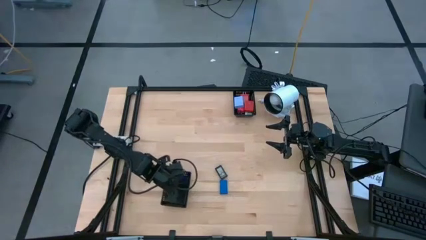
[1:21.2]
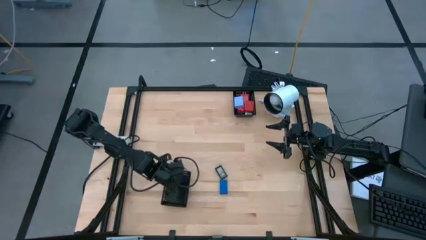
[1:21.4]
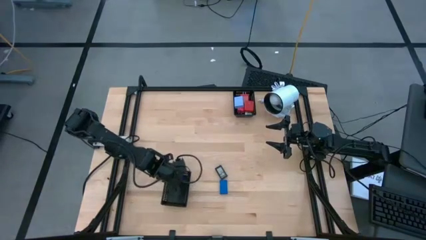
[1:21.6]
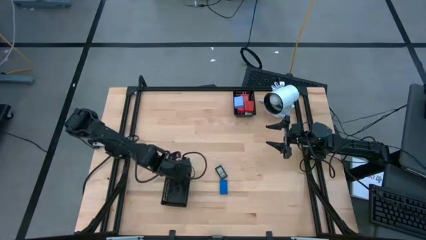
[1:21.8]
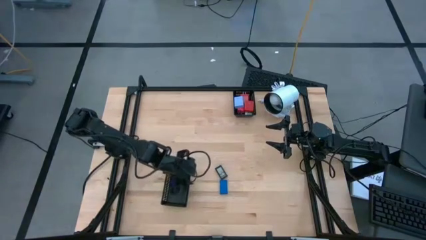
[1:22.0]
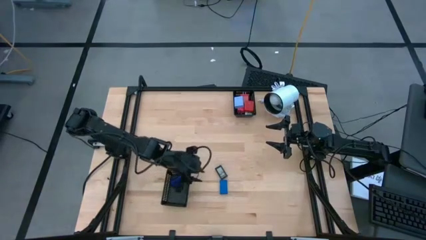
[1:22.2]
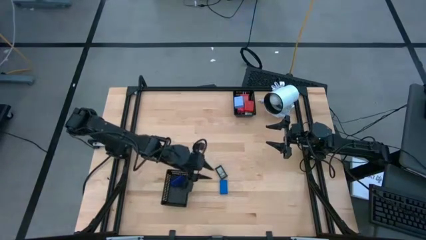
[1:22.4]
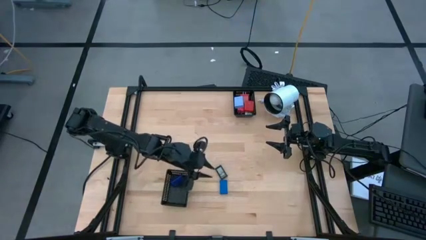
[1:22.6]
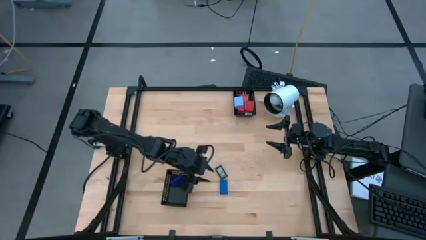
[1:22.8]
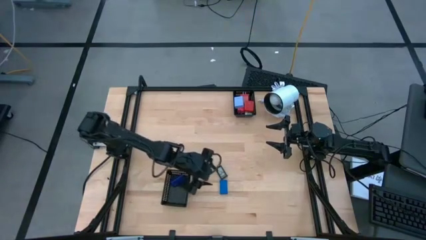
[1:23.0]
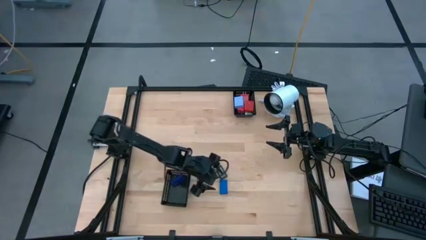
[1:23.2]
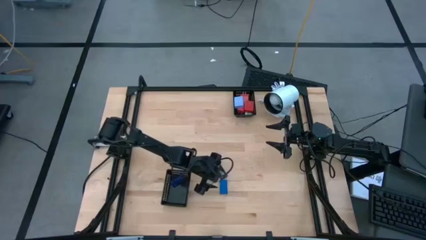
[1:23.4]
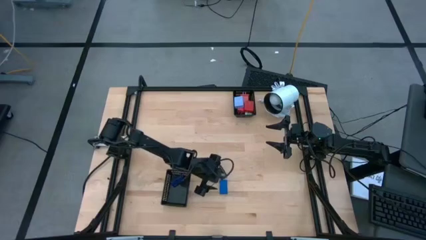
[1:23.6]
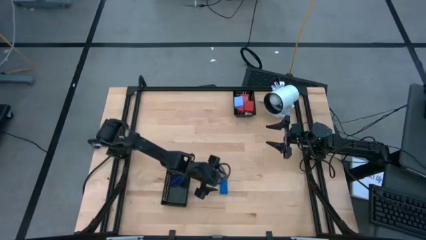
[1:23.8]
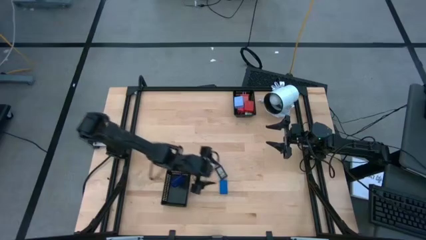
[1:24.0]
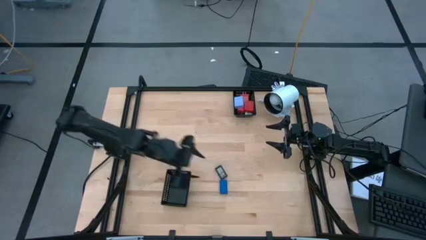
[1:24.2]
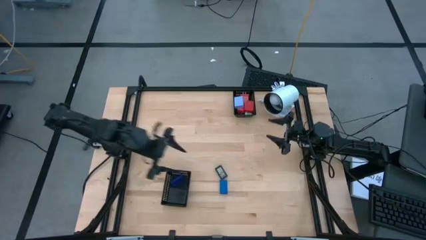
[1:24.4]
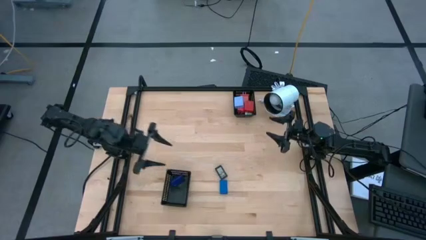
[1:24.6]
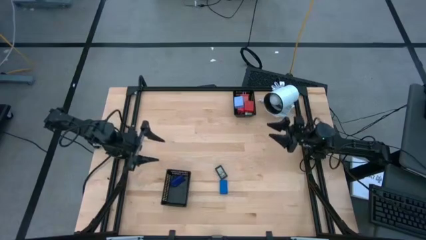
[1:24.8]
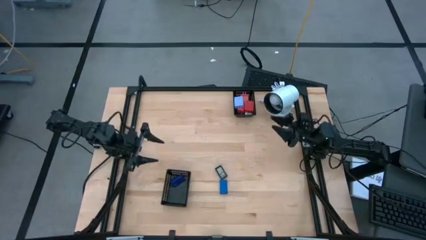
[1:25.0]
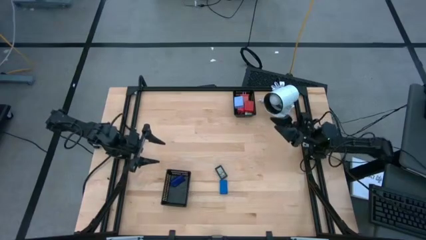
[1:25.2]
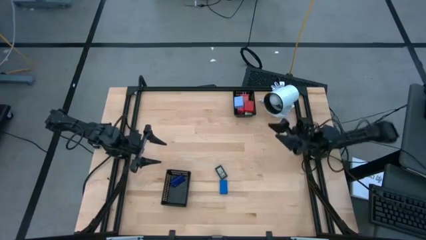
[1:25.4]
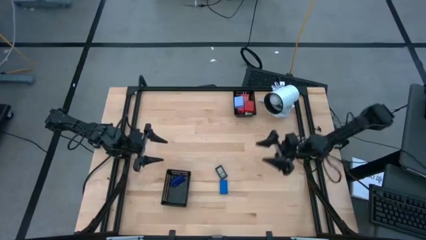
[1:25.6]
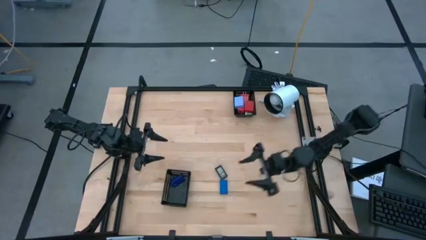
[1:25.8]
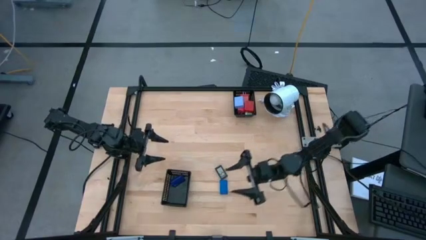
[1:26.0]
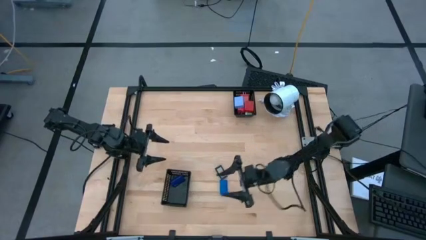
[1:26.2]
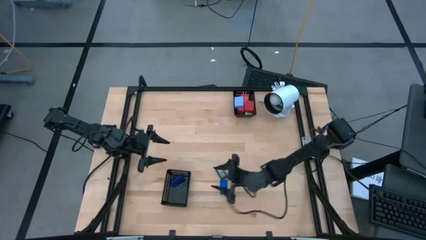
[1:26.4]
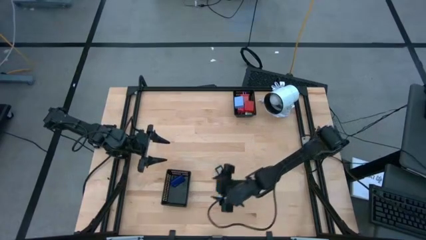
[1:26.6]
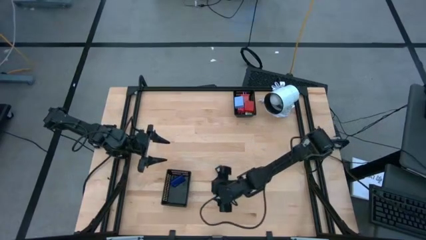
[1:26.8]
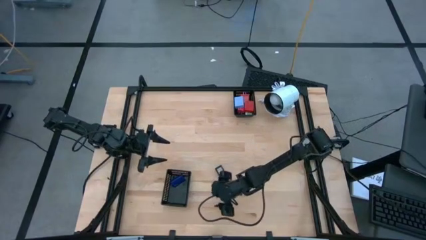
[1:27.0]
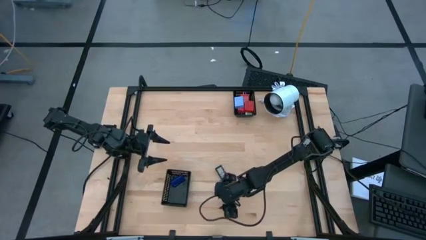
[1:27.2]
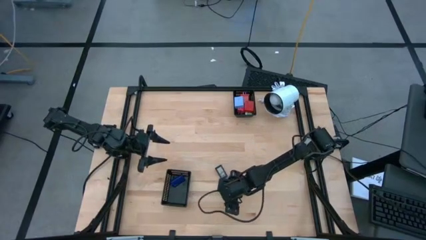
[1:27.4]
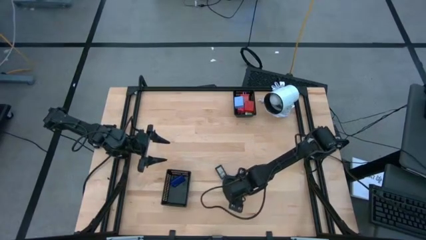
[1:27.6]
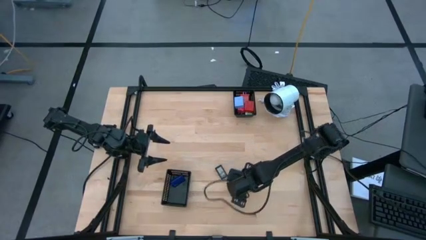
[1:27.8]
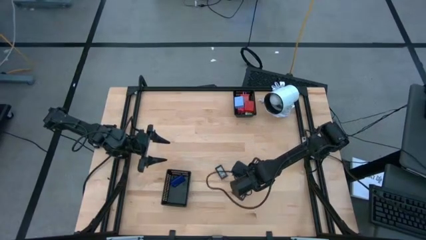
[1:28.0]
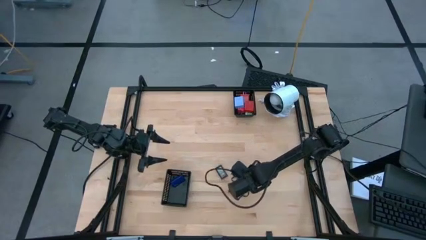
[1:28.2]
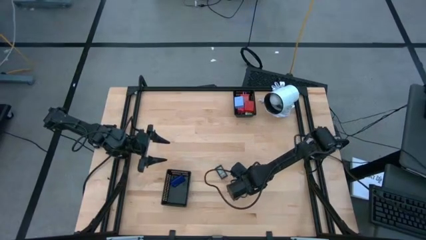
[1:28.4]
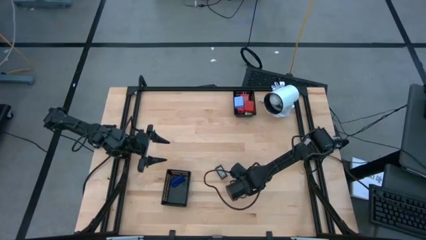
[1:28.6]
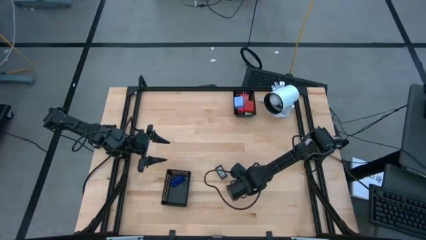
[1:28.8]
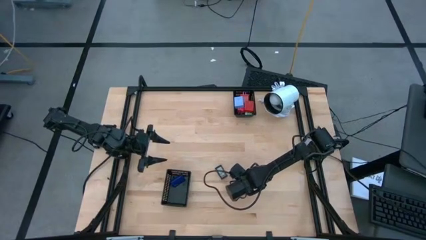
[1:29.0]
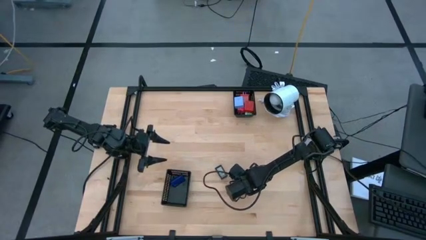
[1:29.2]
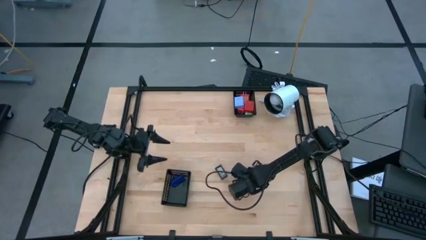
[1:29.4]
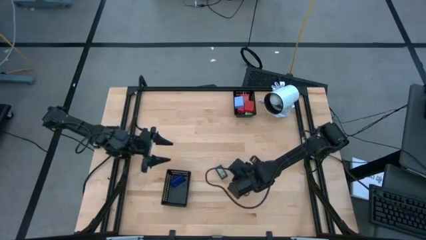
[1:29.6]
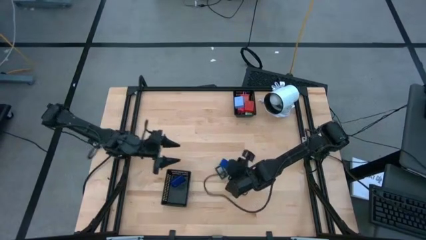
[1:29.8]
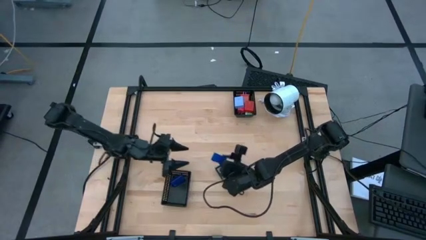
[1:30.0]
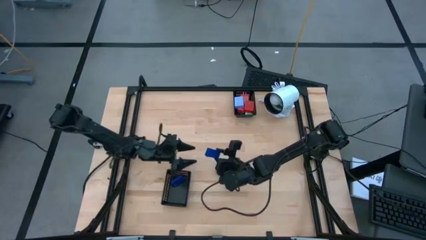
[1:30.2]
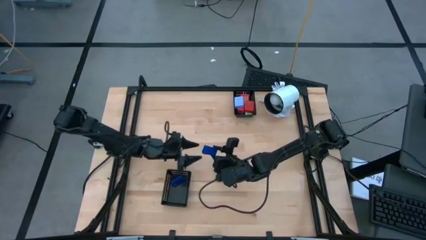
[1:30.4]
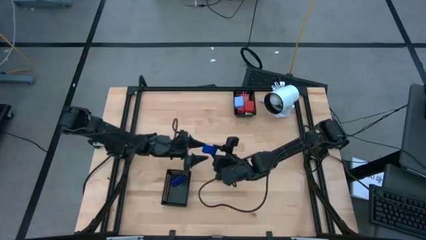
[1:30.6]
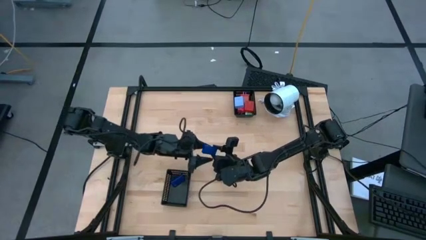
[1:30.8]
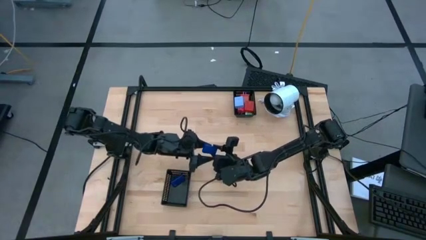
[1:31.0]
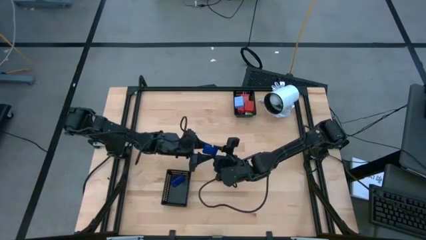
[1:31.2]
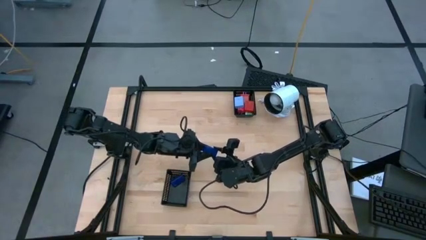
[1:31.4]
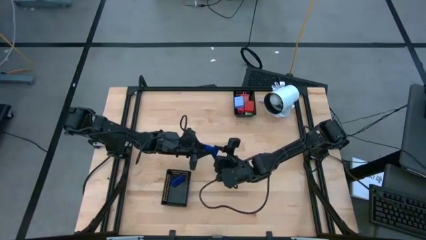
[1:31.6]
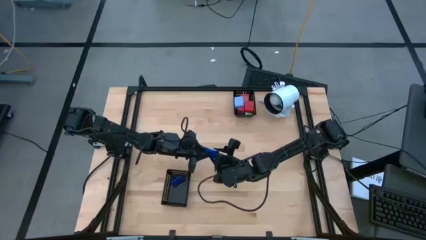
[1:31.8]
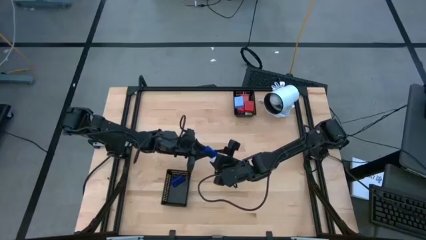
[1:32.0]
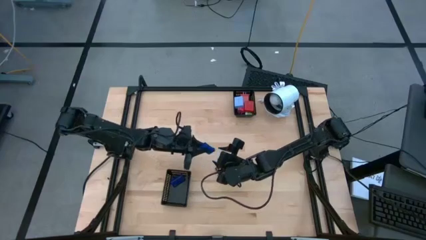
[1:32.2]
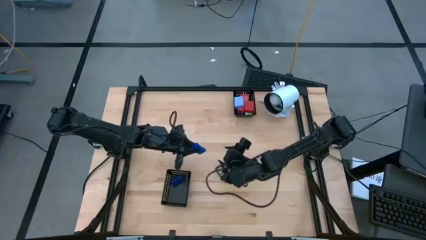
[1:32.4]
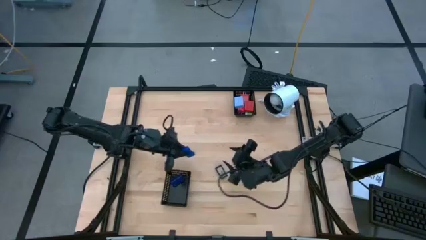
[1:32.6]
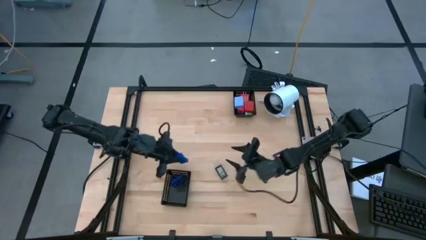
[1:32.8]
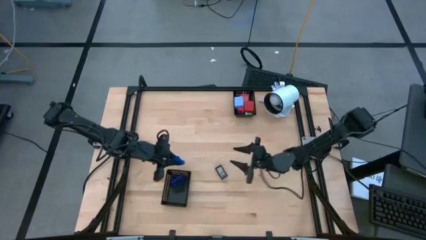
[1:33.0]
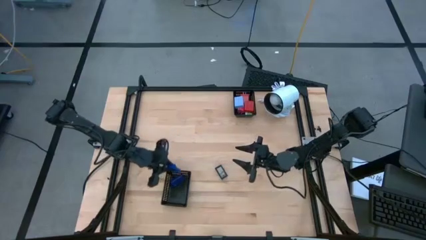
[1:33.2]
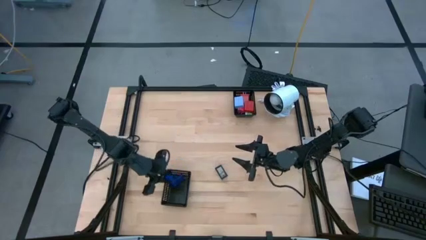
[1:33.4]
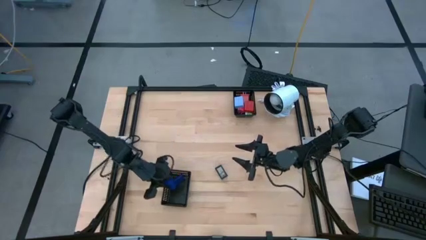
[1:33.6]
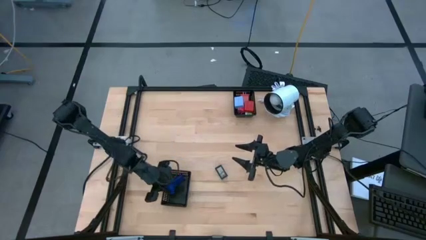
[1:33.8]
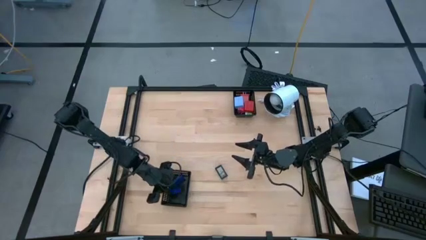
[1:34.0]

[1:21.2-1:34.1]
Task: Pick & Place Office items
Put the blue digital clock into the bottom black basket

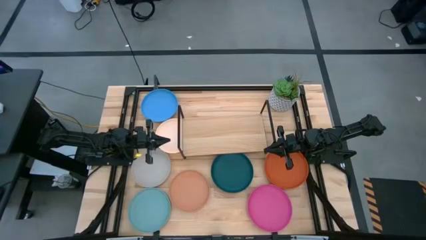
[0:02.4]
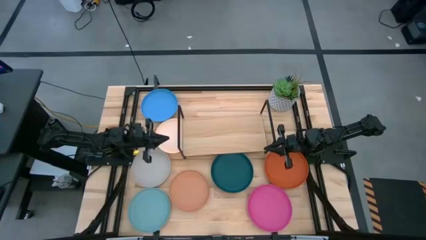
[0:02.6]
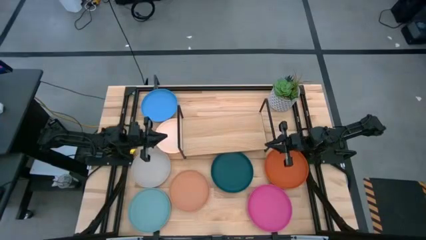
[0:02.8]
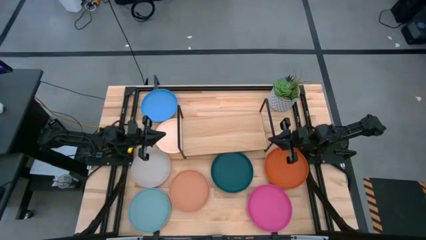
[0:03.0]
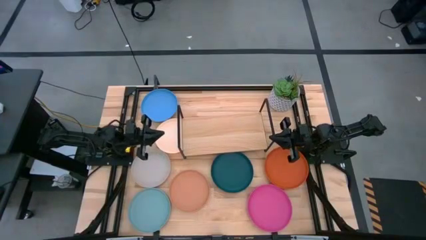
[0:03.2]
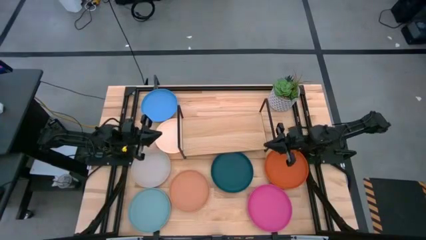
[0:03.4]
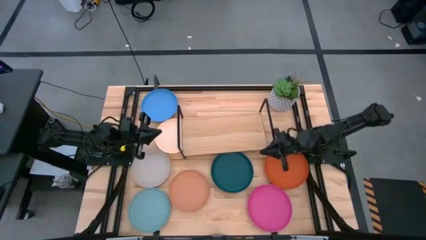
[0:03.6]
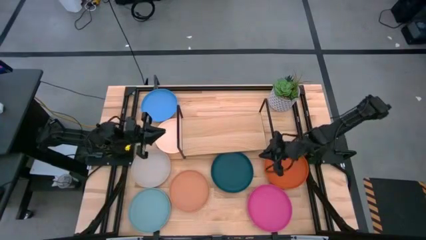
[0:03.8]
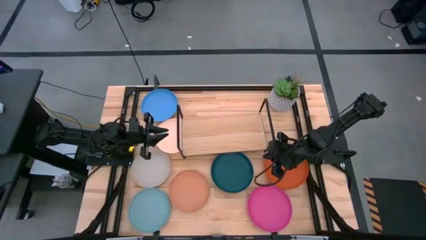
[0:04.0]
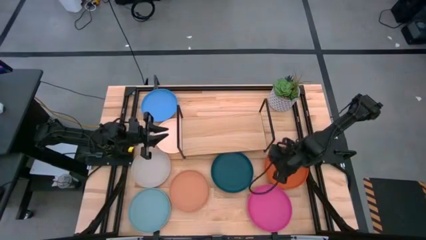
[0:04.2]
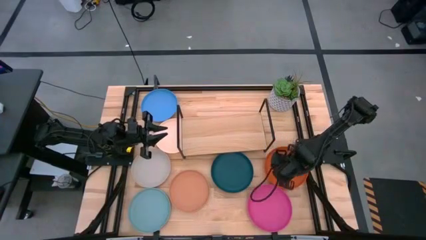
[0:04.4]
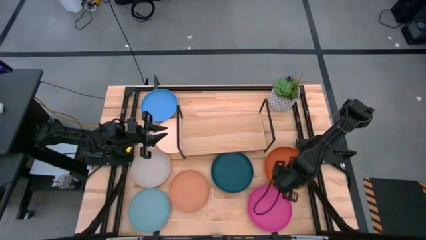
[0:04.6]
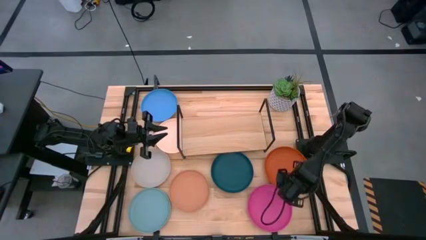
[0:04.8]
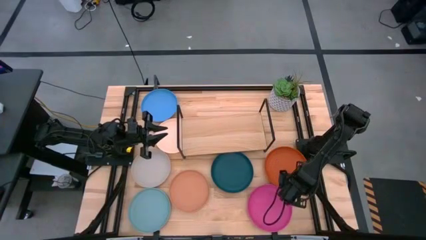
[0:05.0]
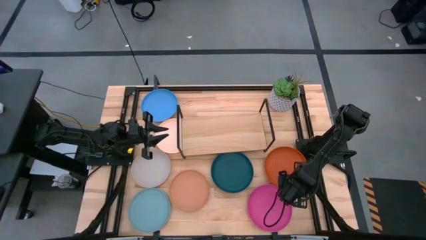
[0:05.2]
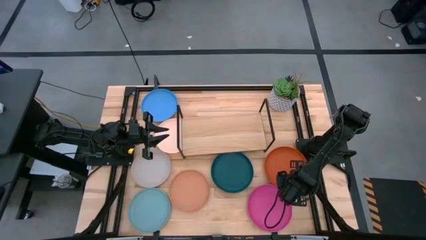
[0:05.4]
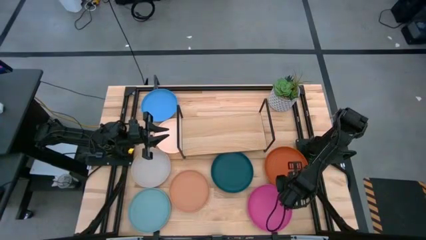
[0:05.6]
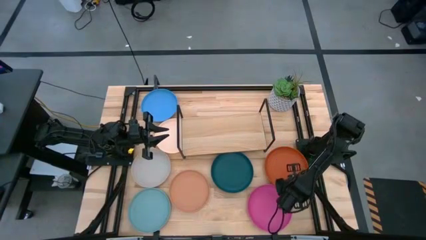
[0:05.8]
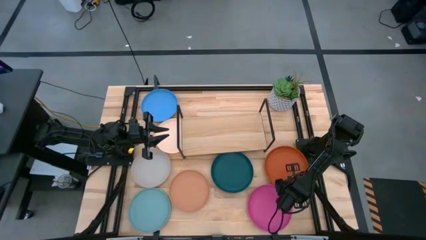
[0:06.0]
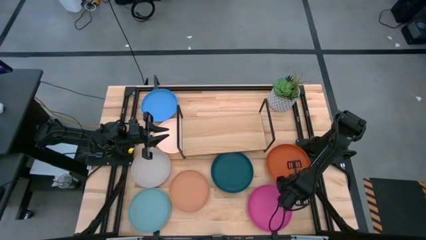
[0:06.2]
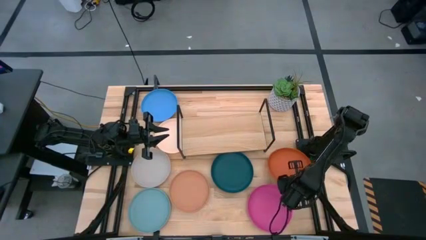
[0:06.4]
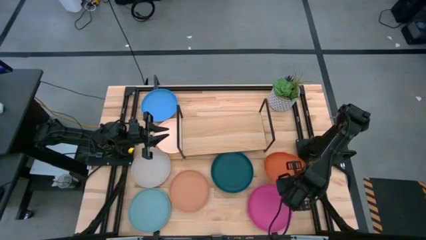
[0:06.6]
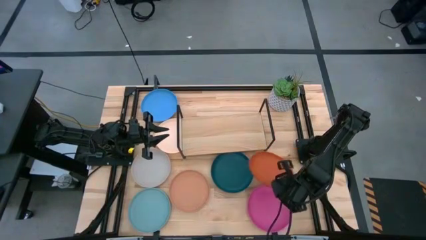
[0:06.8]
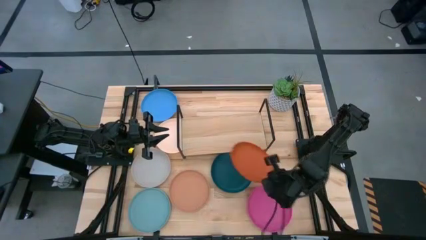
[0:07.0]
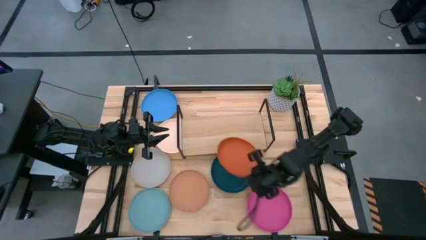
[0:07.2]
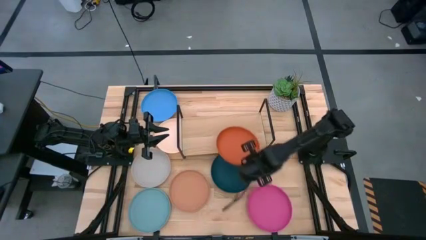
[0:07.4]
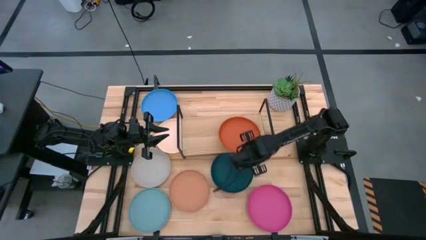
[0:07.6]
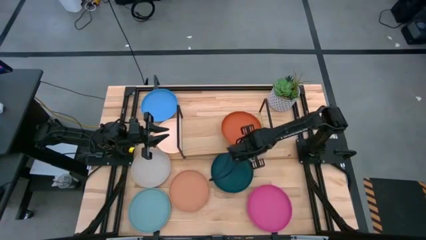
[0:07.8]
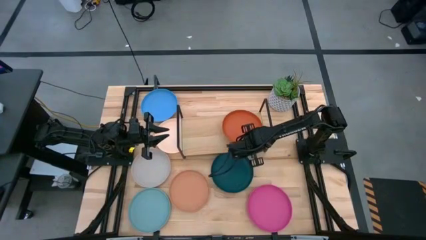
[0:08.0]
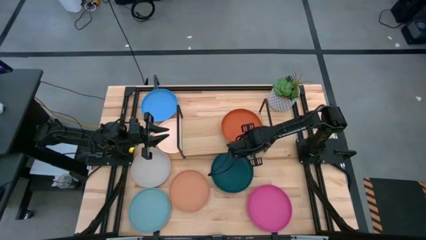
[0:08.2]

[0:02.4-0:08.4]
Task: Place and stack plates onto a shelf
Put the orange plate on the shelf
